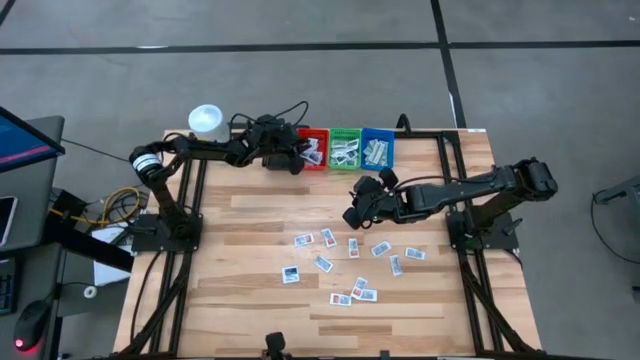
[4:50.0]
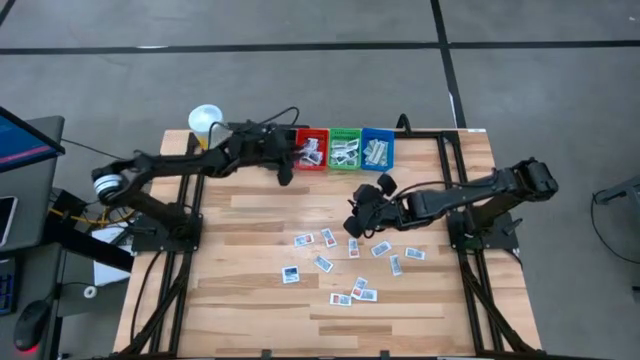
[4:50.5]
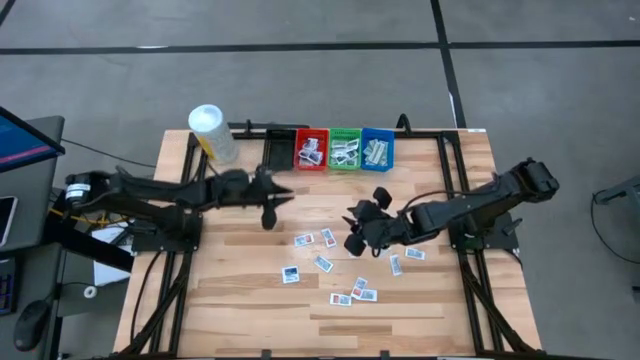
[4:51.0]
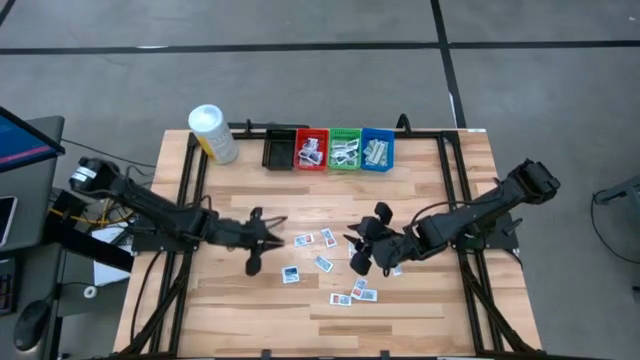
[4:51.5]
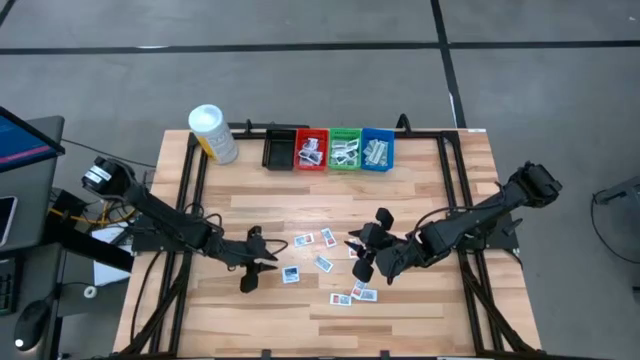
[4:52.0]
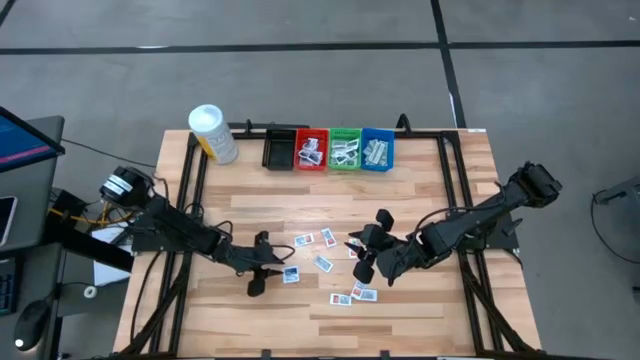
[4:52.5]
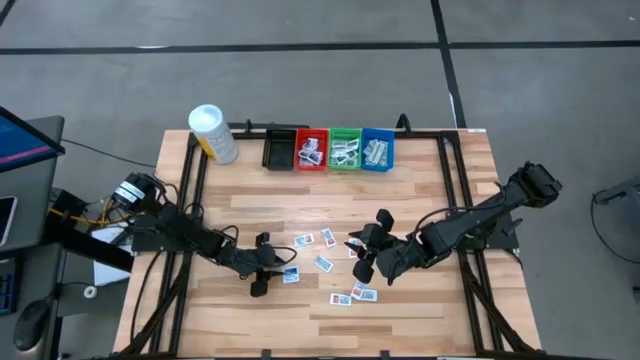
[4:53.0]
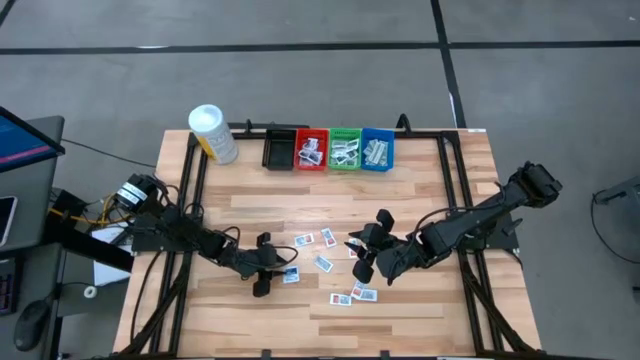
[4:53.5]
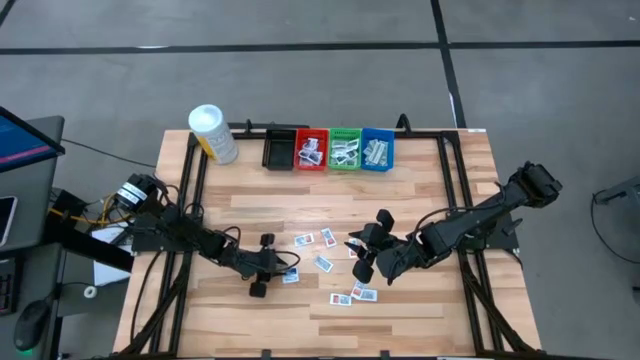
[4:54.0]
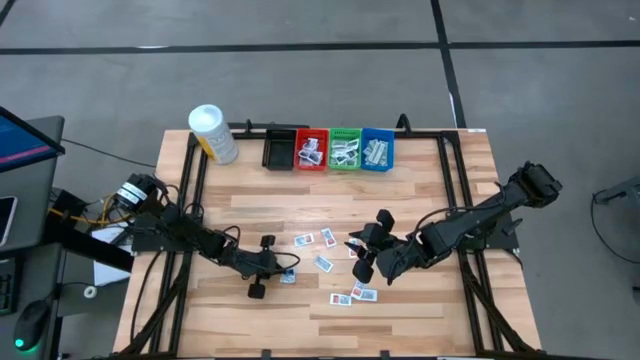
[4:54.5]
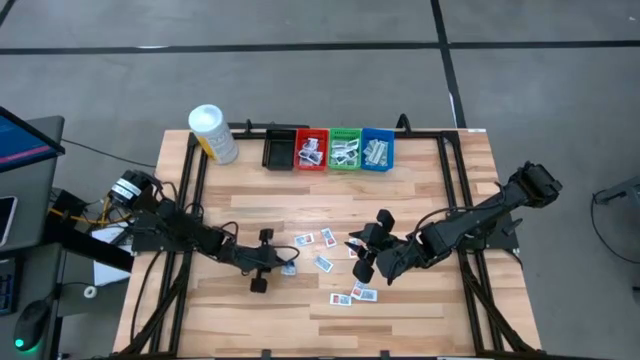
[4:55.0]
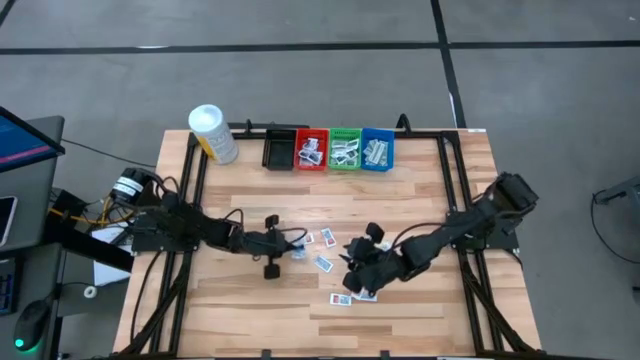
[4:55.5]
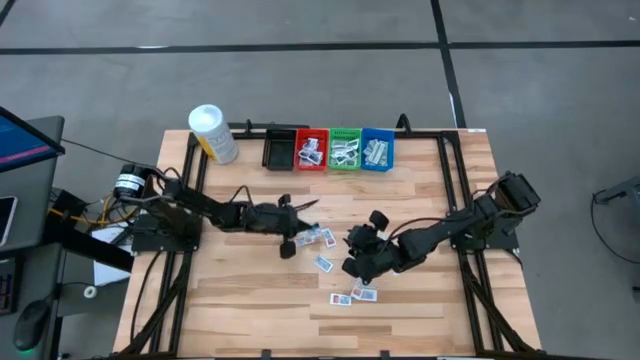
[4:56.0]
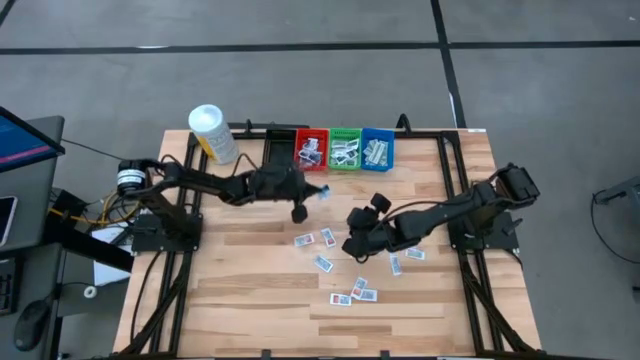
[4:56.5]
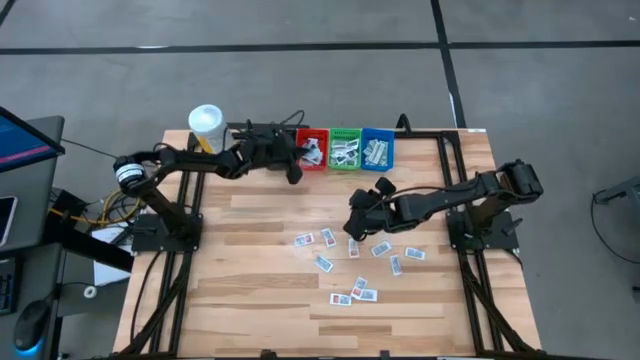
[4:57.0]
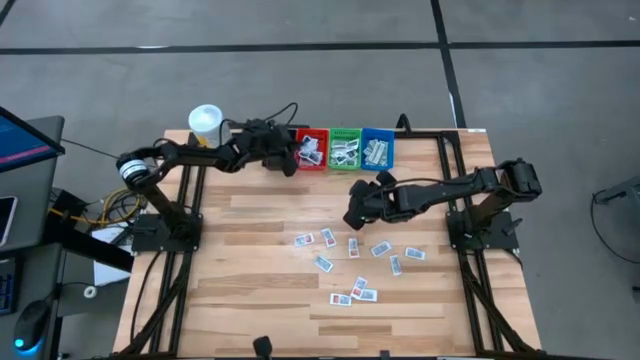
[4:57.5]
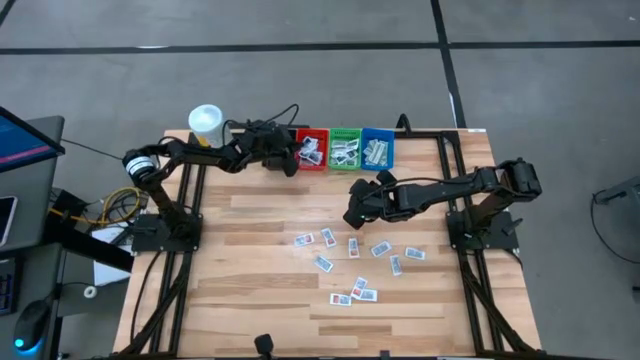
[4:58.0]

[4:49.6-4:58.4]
Task: Pick & Place First Aid Supplies
Put the alcohol pad into the red bin

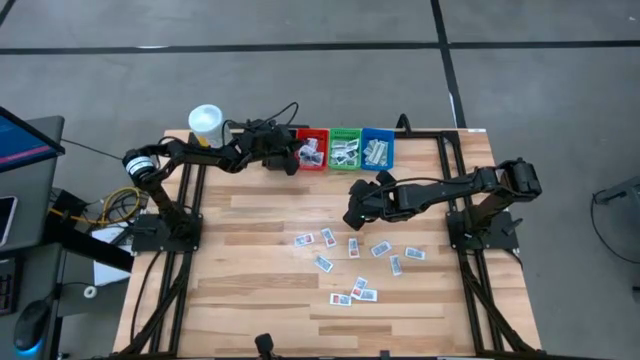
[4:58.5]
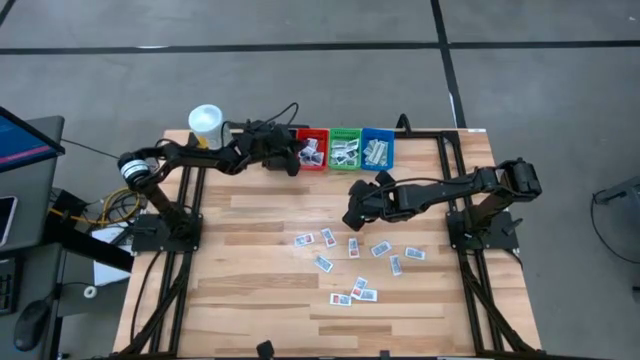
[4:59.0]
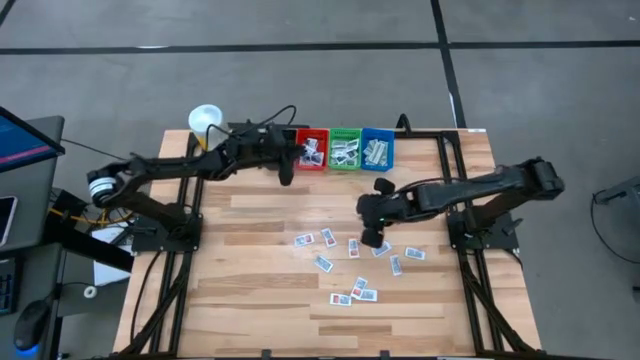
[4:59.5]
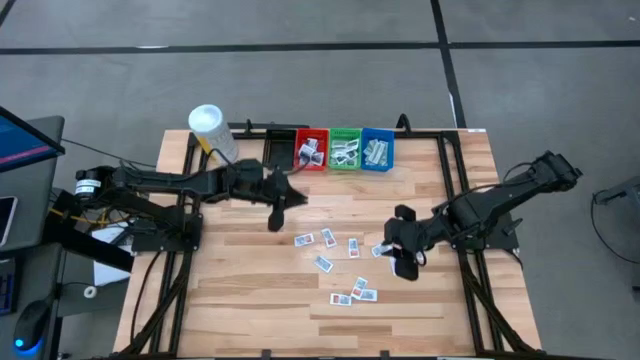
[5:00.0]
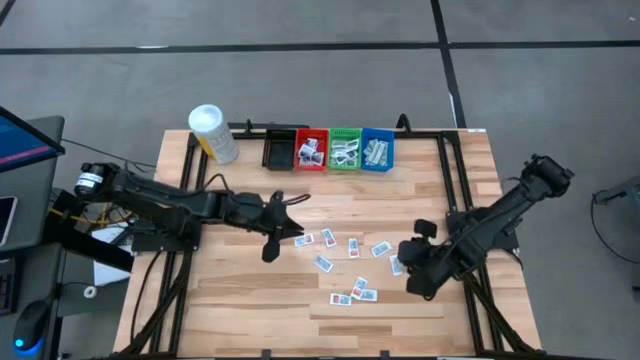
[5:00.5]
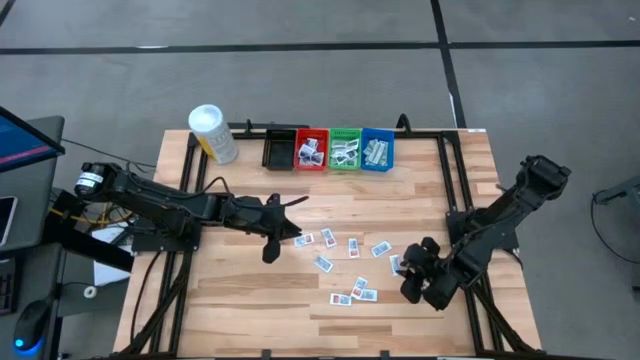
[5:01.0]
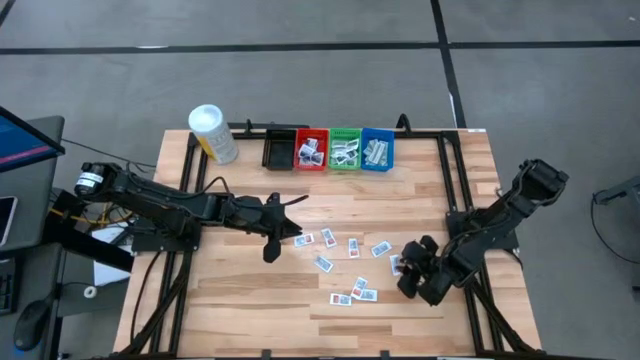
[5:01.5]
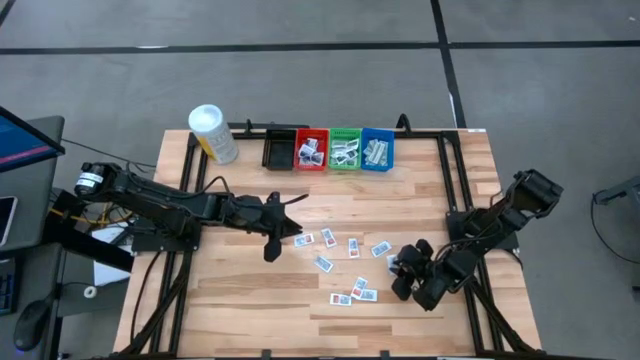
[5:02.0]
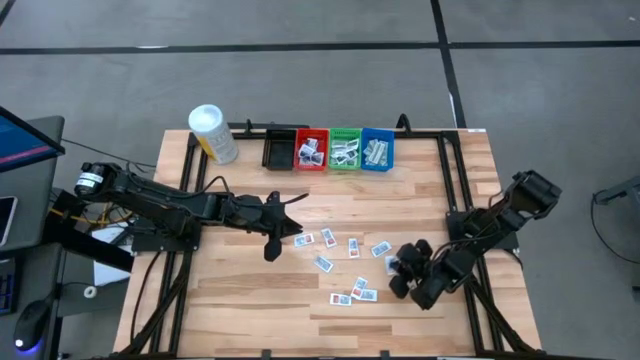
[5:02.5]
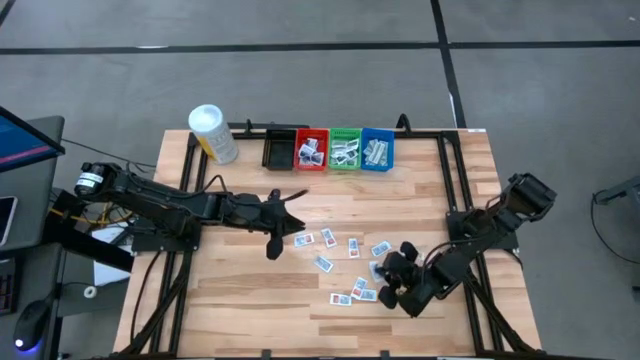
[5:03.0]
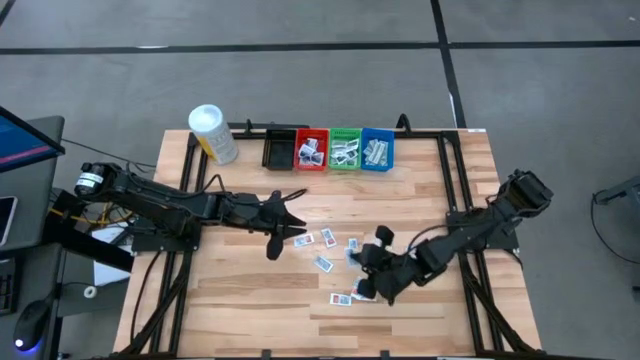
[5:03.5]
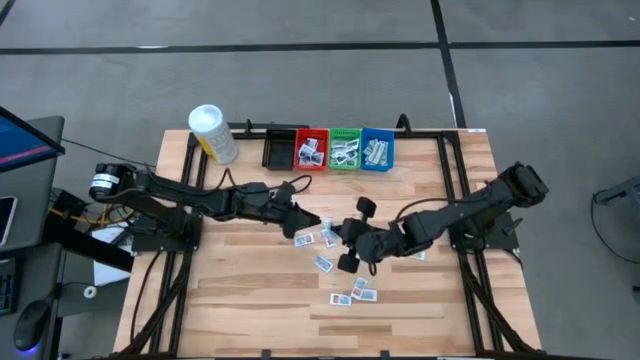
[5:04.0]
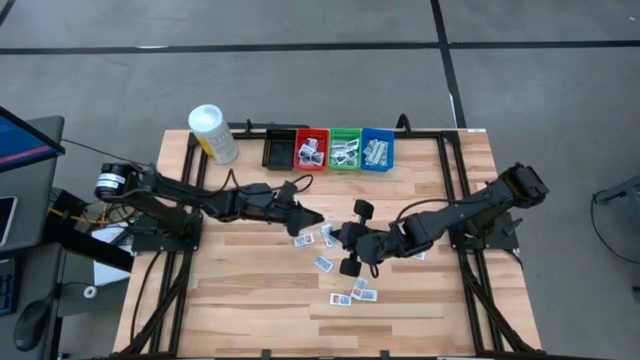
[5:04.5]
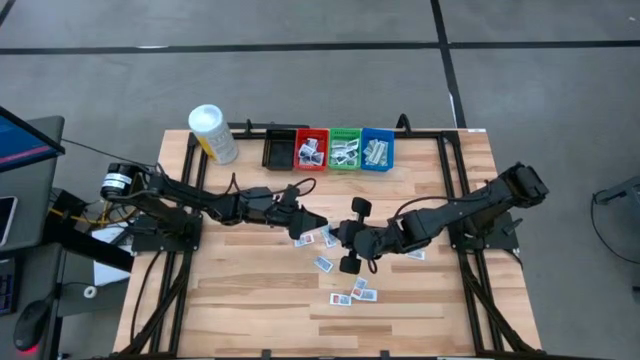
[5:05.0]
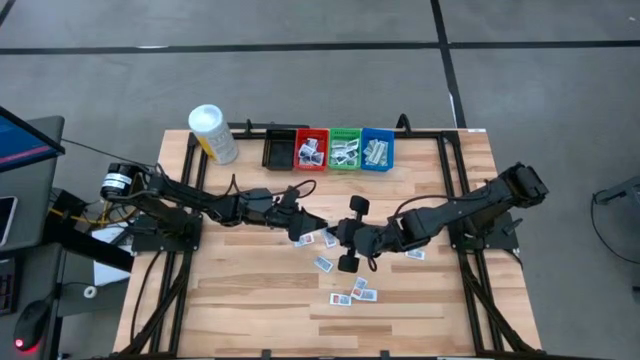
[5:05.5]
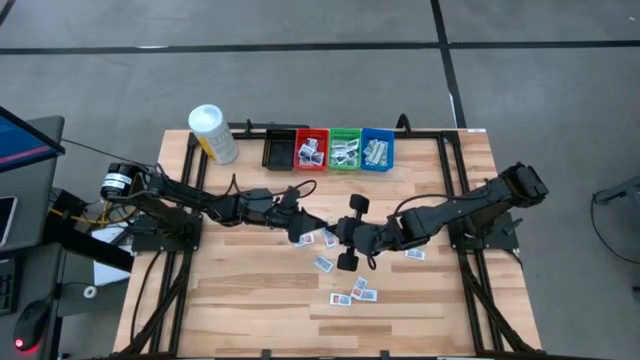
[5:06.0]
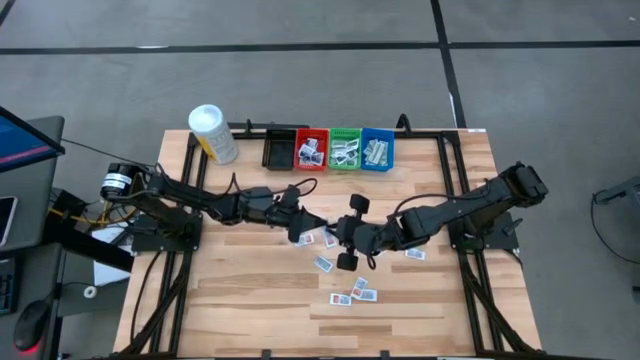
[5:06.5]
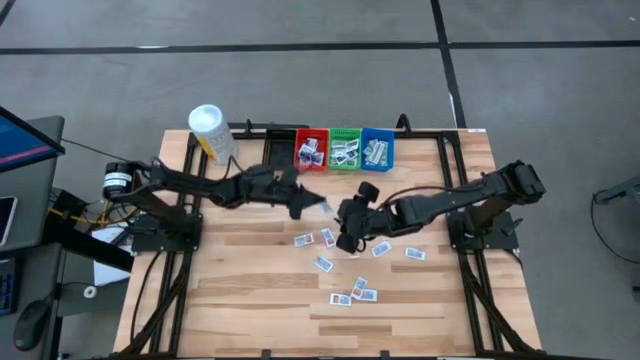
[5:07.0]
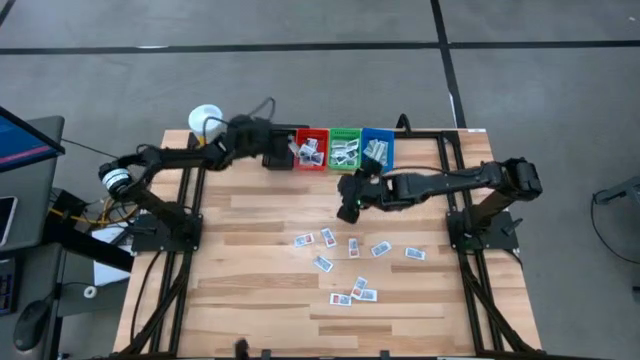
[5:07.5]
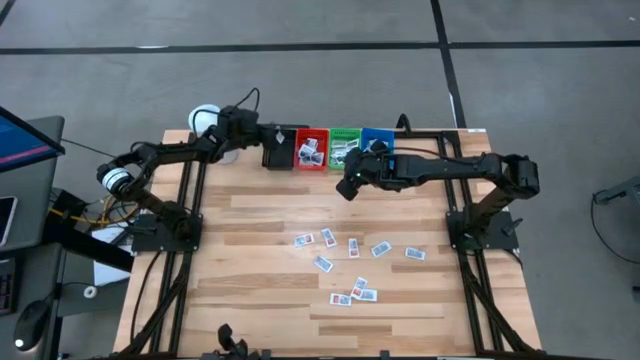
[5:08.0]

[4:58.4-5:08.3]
Put the ointment pack into the black bin

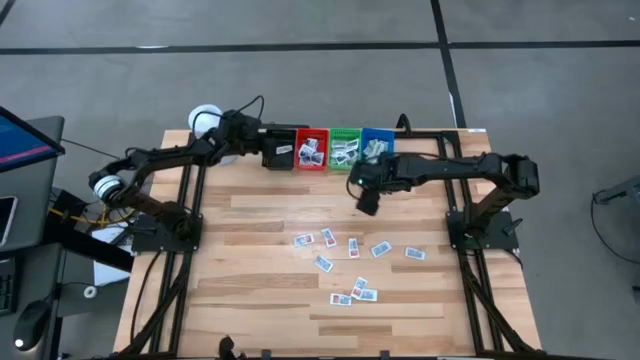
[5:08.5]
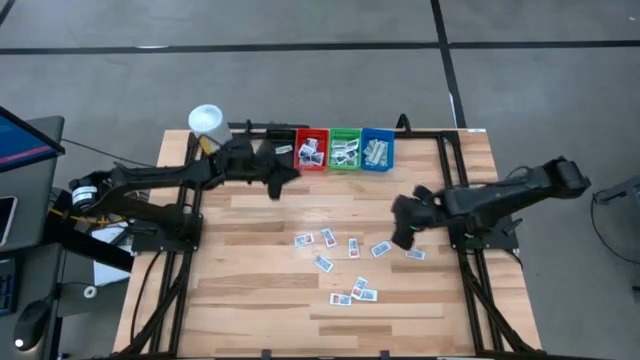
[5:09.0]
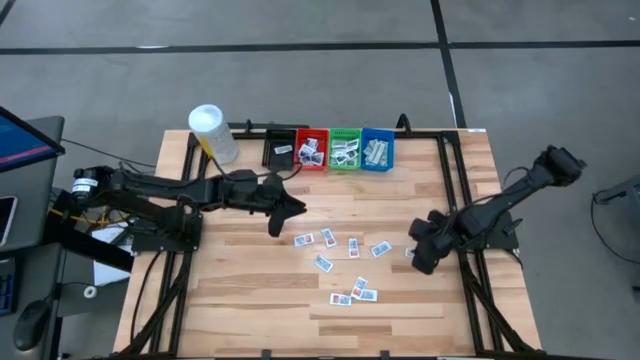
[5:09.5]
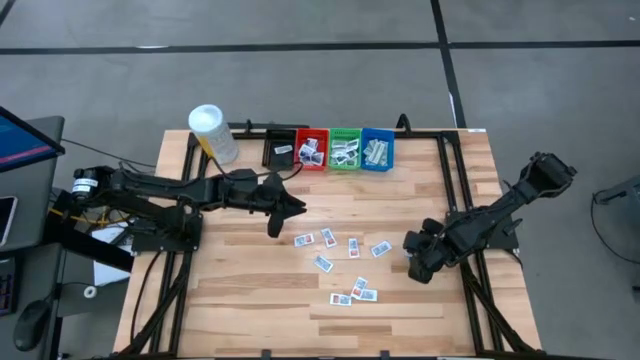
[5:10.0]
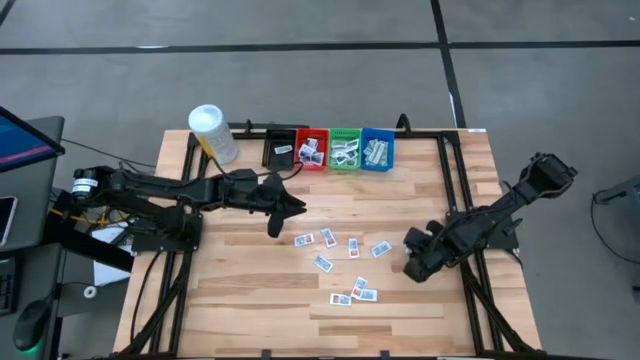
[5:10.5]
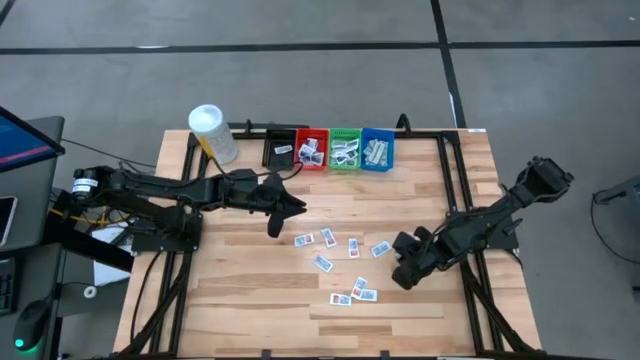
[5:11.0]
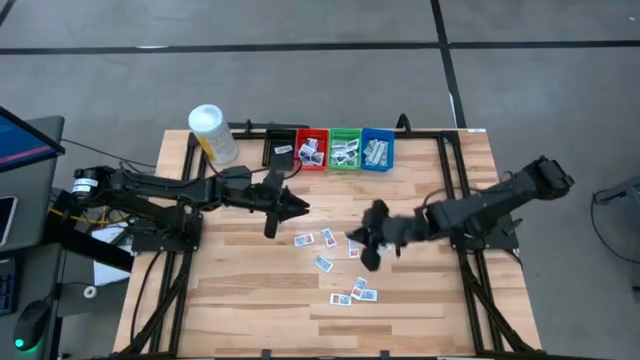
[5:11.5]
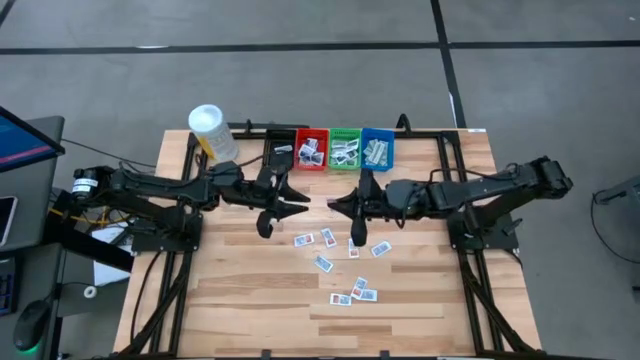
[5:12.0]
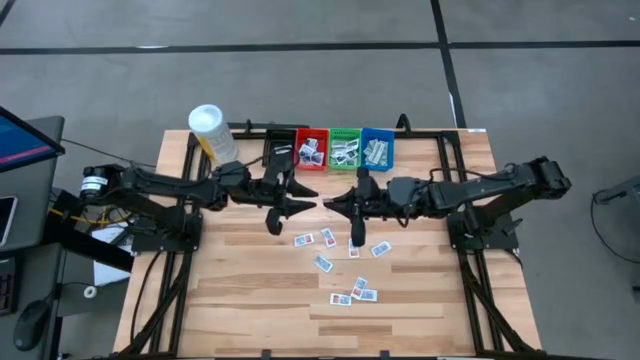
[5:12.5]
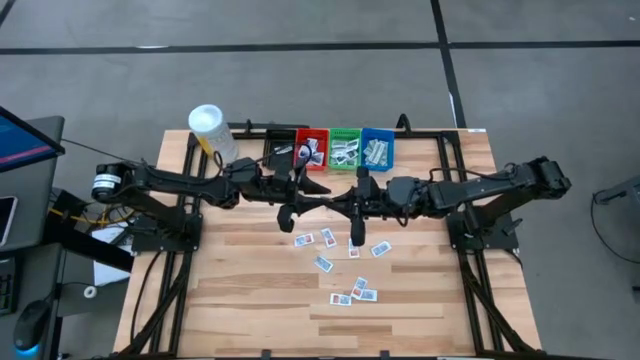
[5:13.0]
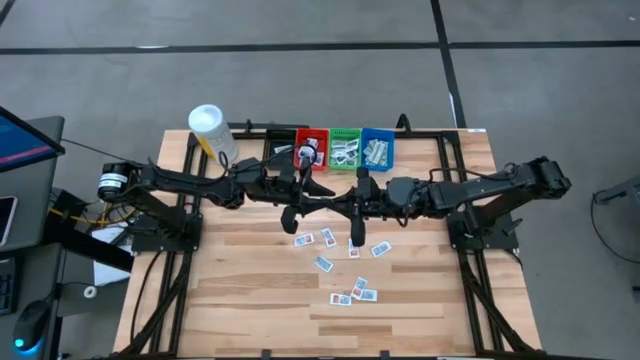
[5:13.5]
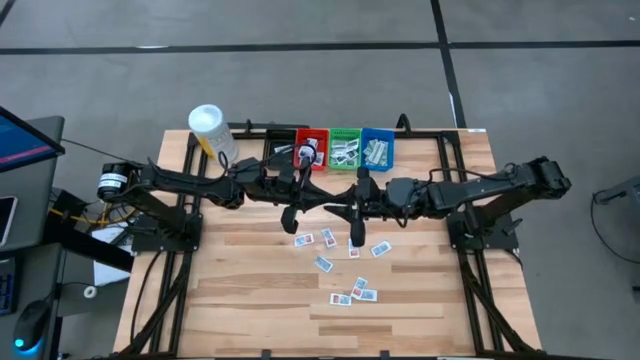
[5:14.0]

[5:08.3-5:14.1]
Put the ointment pack into the black bin
